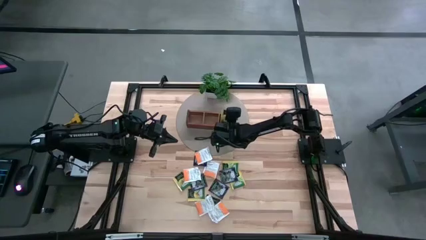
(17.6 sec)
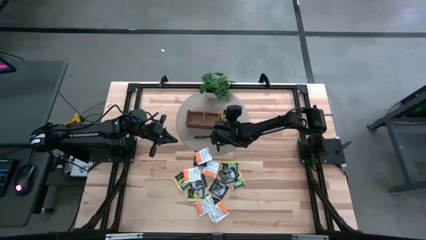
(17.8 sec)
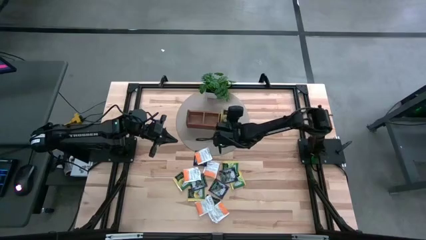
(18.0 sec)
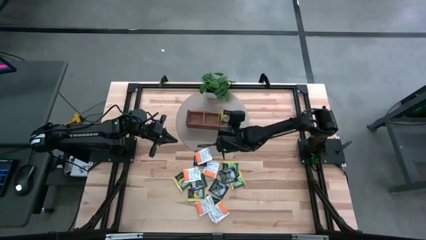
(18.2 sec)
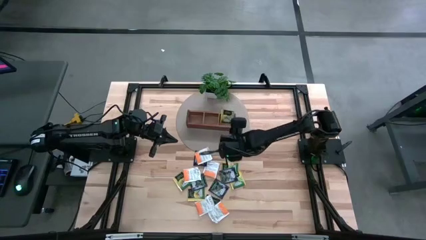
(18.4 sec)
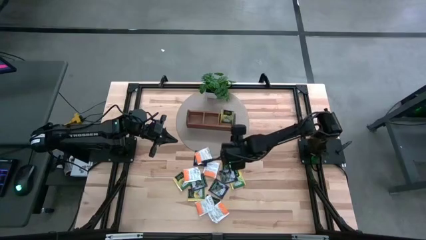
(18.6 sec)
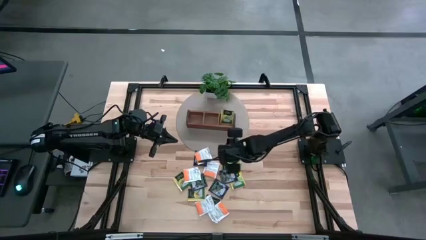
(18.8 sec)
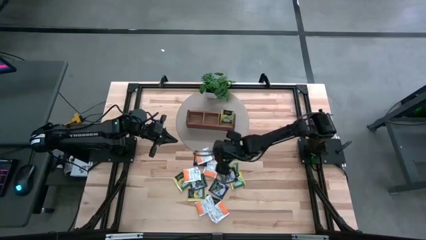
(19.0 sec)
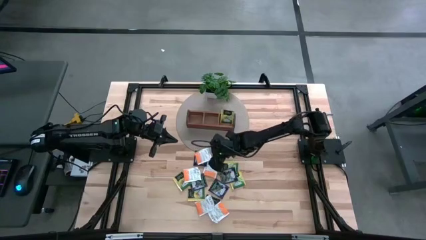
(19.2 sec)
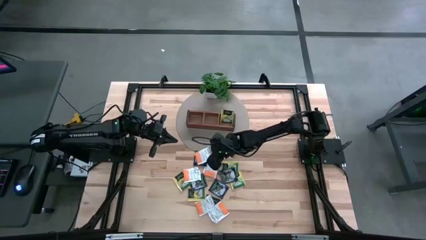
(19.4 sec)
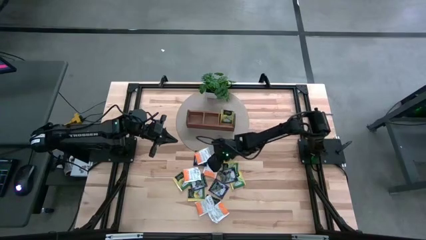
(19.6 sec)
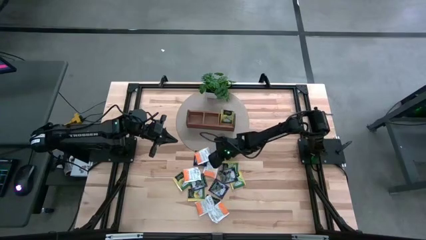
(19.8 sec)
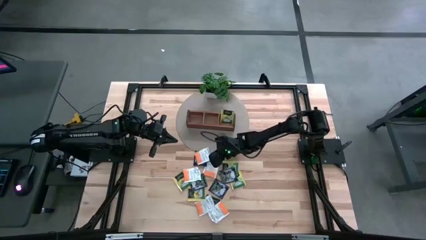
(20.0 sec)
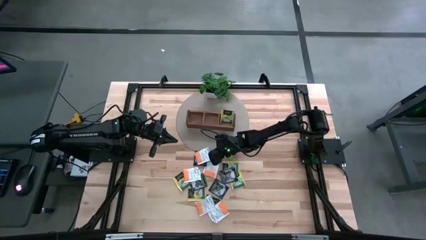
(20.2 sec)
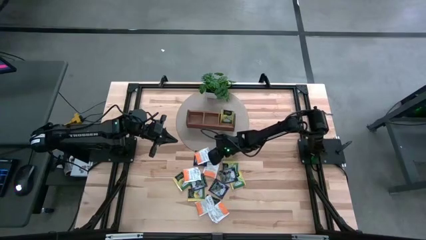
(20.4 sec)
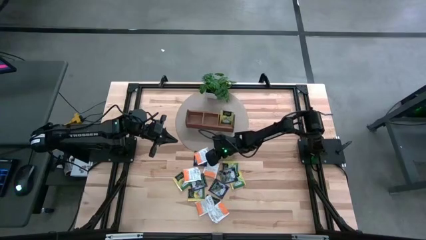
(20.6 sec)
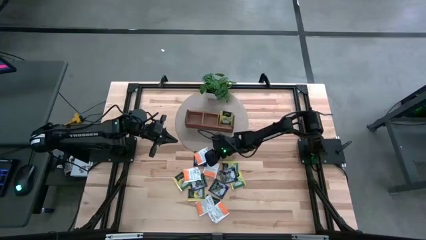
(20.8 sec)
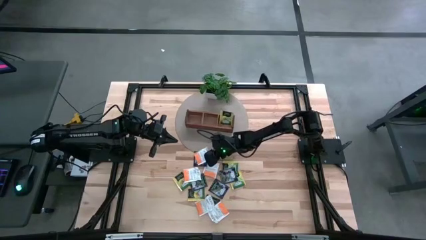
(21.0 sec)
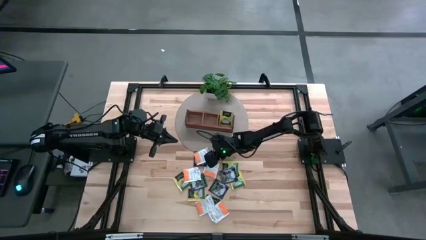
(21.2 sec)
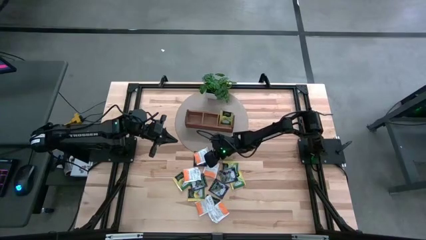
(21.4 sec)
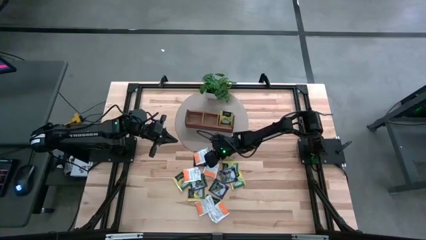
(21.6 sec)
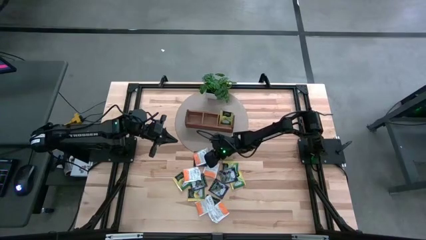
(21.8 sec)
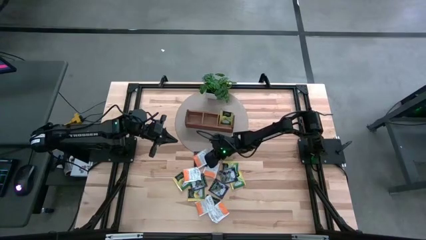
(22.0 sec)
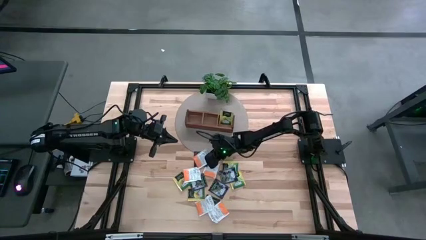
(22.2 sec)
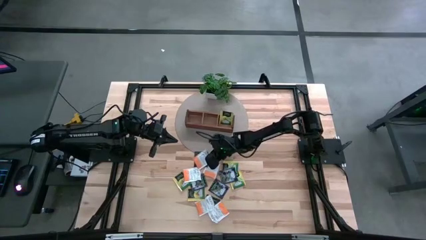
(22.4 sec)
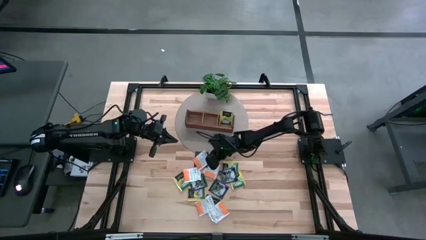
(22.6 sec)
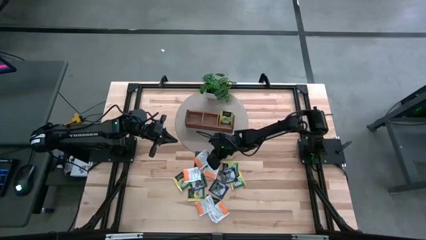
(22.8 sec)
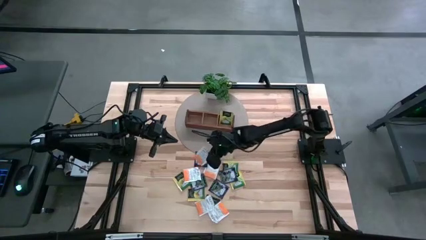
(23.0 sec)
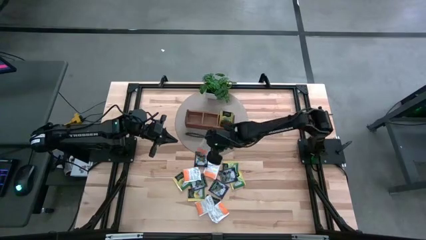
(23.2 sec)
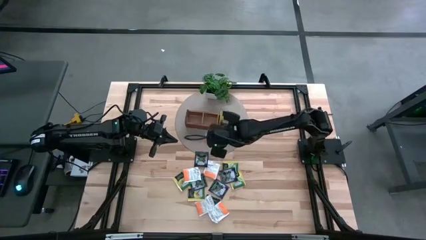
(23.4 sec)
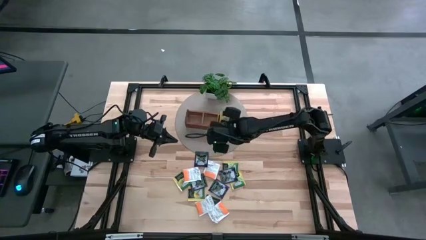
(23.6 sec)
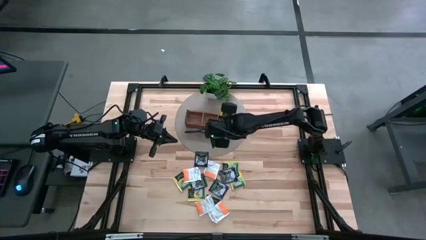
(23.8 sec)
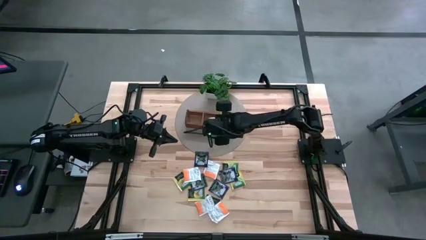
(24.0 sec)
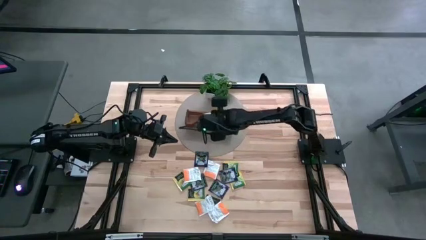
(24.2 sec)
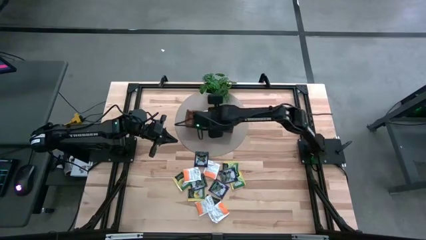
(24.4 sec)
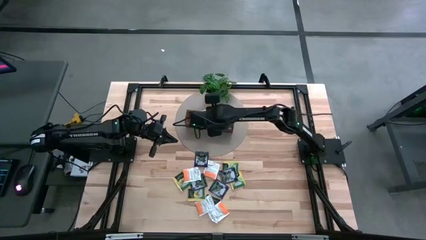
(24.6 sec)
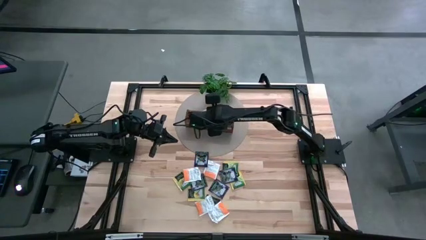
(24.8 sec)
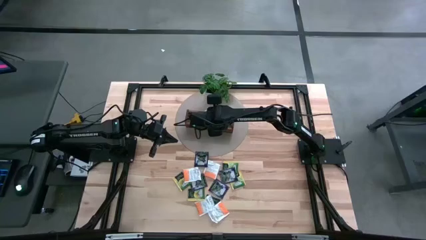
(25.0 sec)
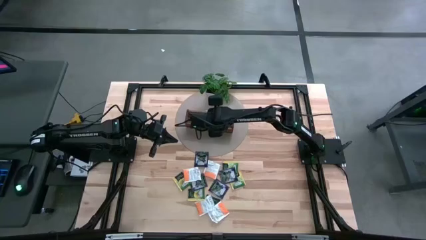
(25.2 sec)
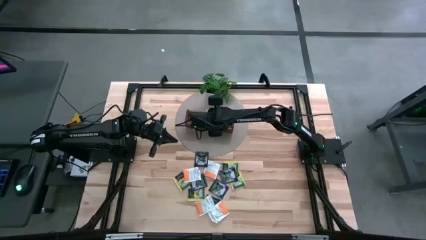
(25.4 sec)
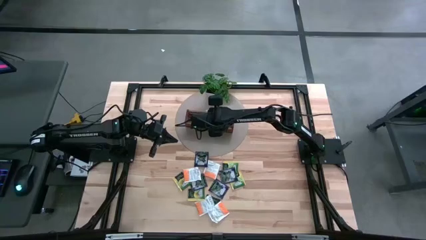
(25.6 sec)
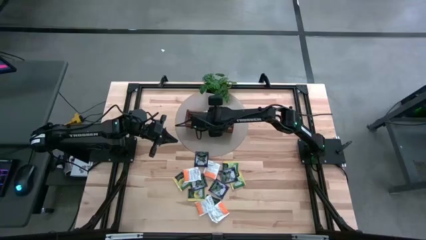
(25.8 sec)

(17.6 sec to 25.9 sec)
Task: Pick & Place Tea
Put the white tea bag into the middle section of the wooden organizer

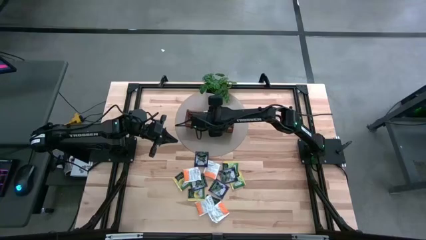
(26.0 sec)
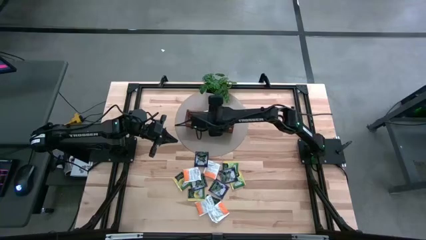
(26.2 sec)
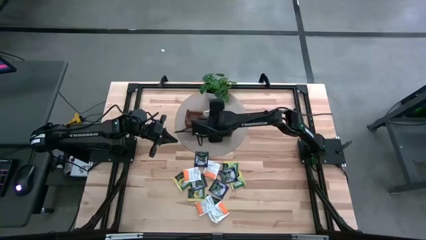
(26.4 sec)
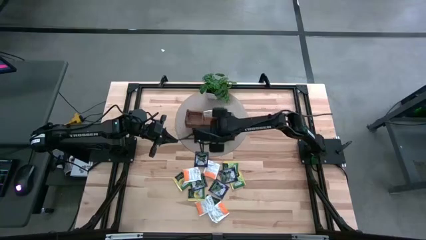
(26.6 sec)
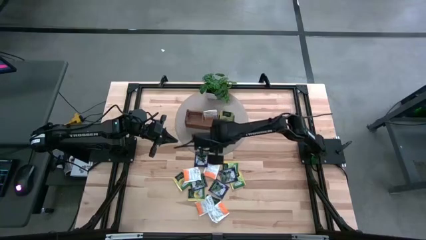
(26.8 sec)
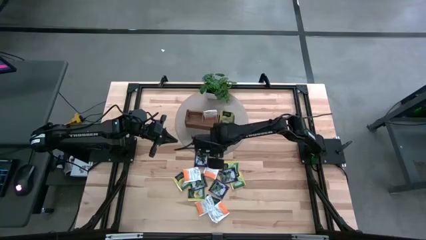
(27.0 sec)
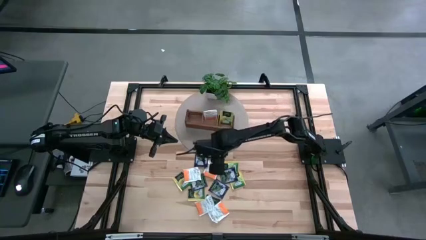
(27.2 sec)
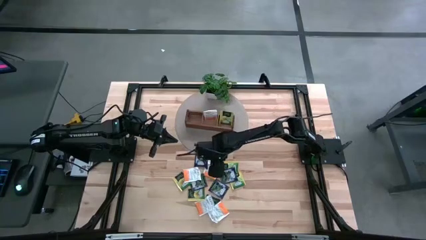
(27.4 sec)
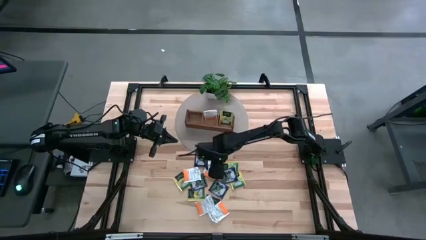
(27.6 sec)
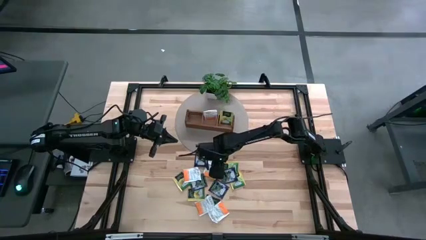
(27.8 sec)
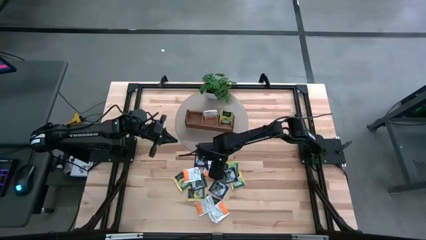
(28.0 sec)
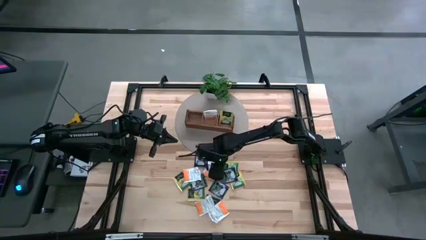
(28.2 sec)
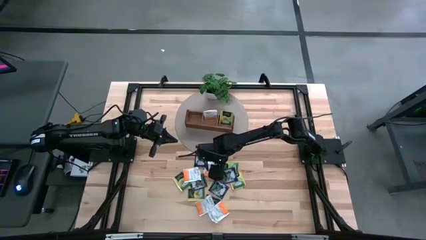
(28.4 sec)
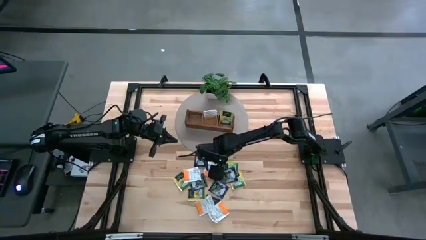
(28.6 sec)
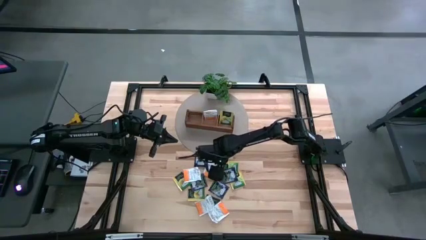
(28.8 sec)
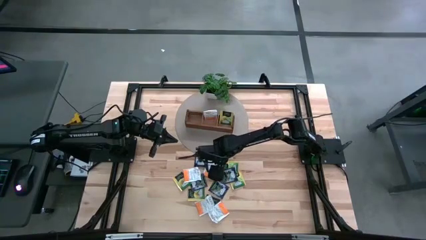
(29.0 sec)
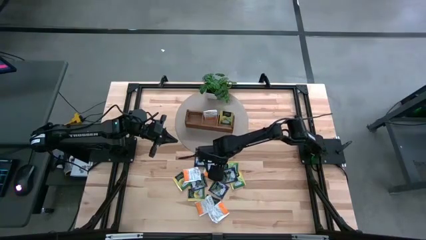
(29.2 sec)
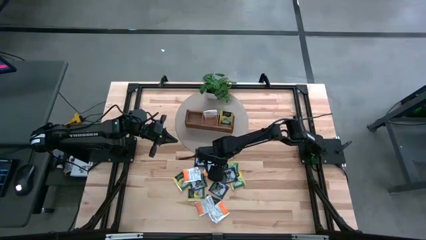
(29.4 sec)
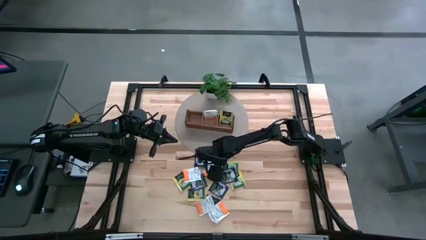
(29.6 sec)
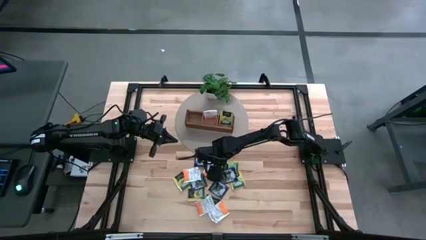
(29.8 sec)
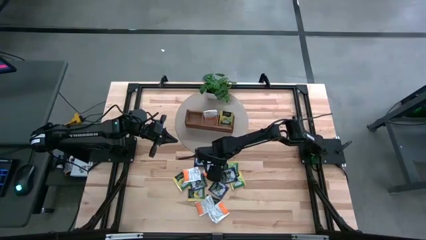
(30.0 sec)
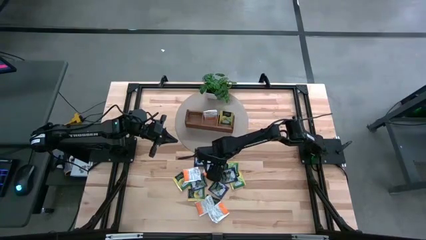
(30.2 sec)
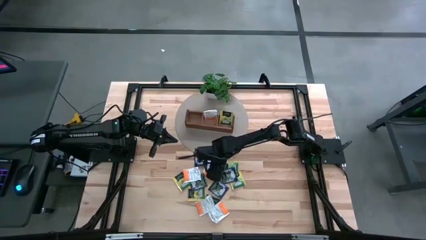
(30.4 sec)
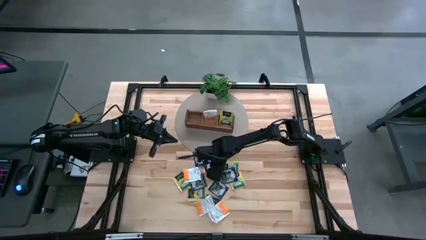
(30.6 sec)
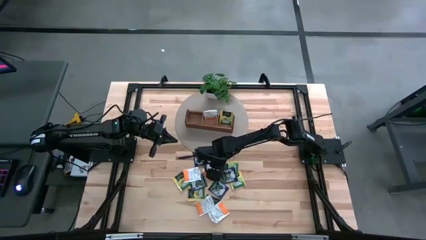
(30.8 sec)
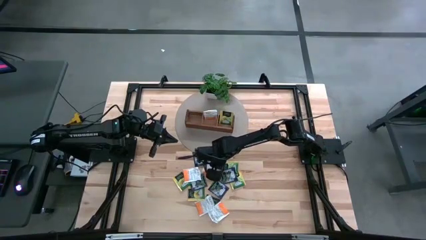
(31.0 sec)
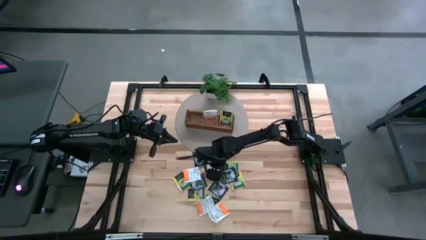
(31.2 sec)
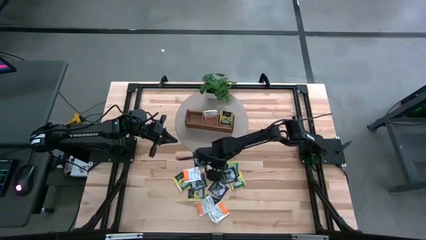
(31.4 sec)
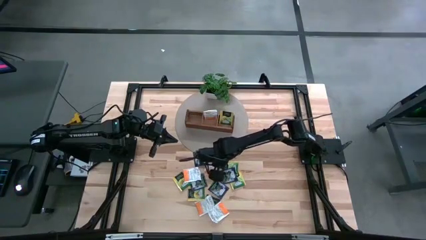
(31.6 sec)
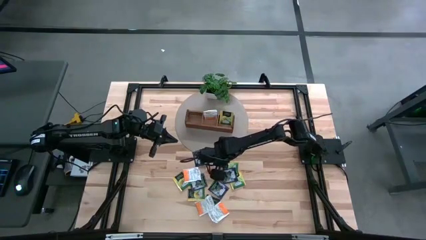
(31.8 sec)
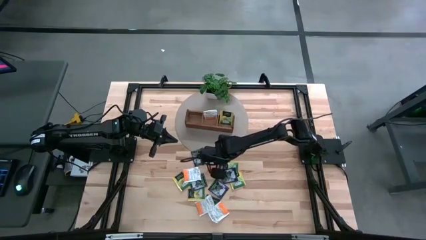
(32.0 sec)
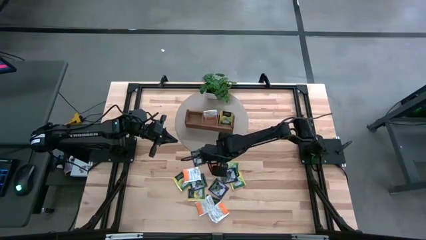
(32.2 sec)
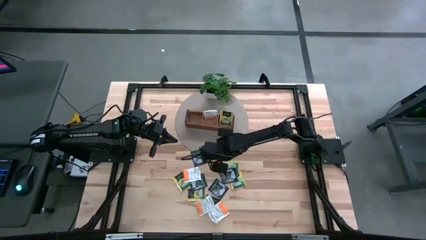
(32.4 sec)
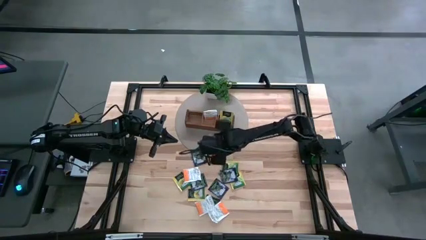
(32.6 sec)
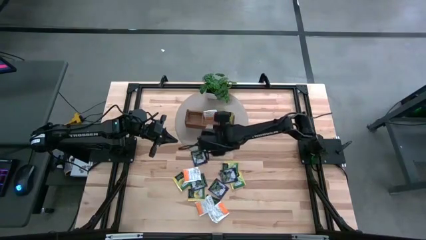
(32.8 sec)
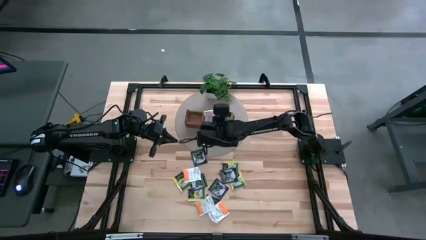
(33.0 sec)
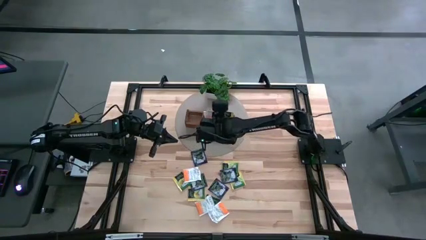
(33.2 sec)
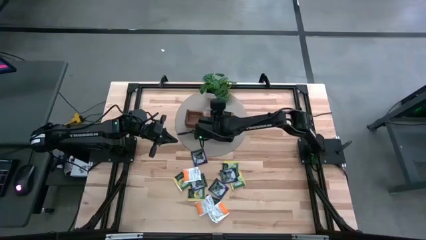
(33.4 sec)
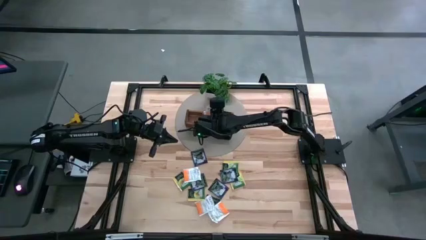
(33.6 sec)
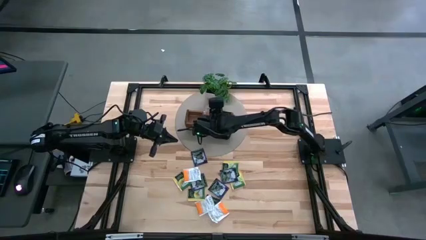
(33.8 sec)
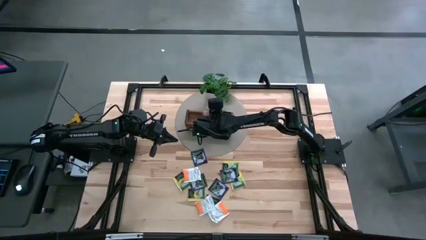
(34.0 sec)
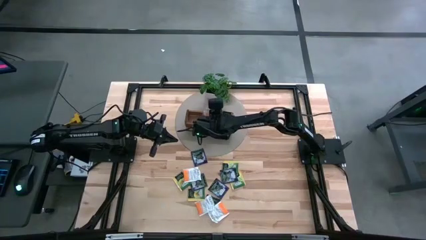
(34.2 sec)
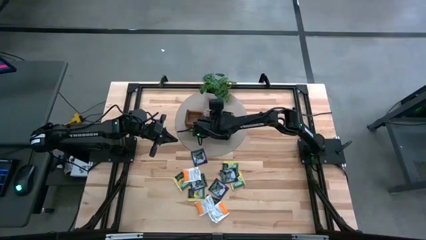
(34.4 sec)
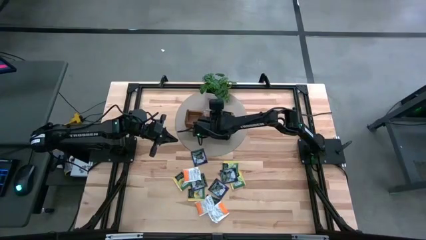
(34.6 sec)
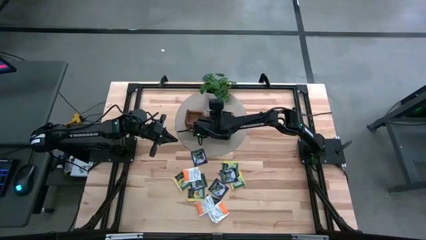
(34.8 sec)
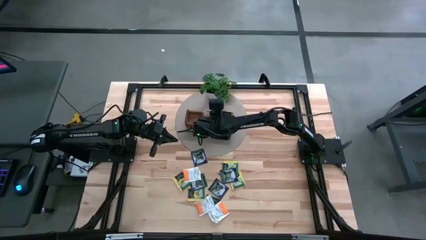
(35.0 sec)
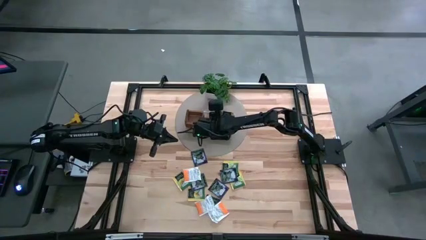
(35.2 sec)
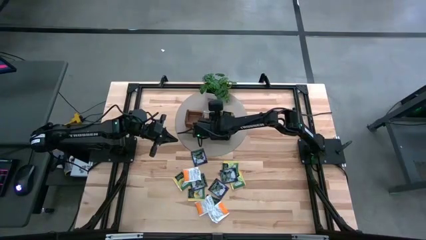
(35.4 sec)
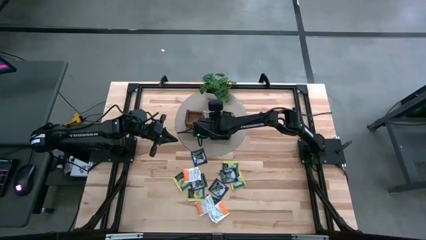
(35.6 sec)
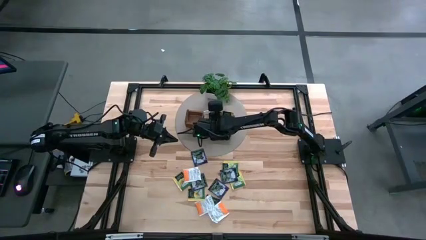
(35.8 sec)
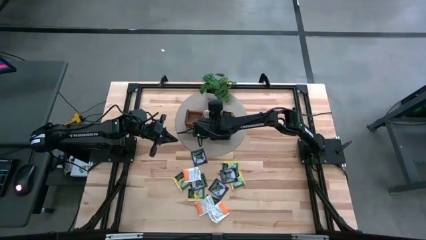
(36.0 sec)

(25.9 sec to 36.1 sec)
Put the white tea bag into the middle section of the wooden organizer
